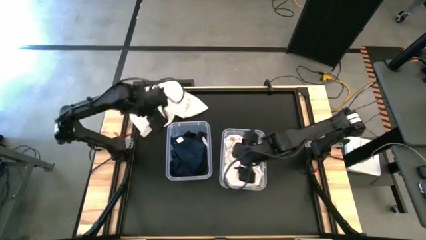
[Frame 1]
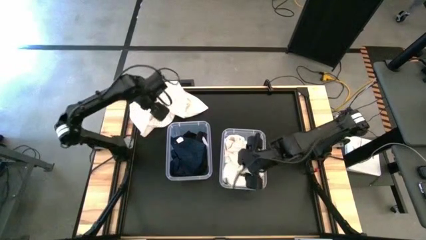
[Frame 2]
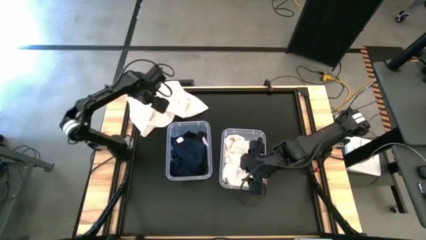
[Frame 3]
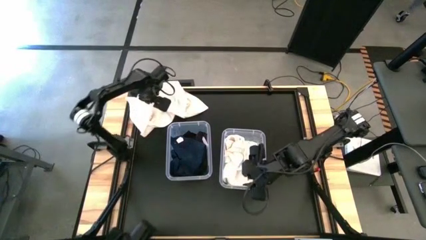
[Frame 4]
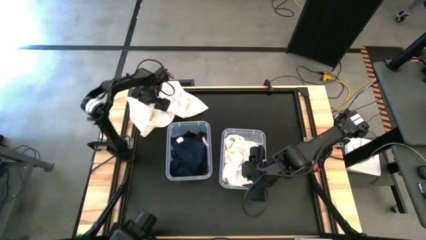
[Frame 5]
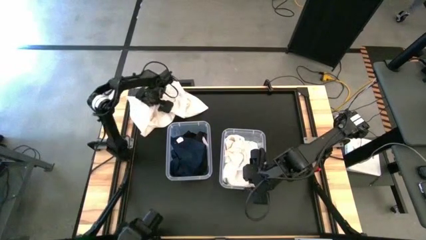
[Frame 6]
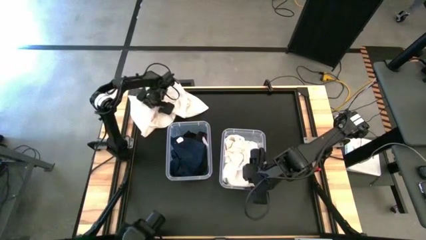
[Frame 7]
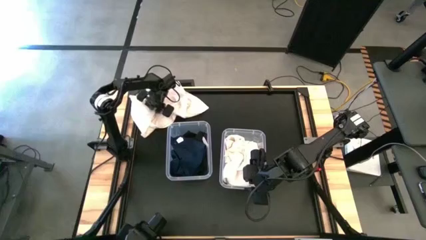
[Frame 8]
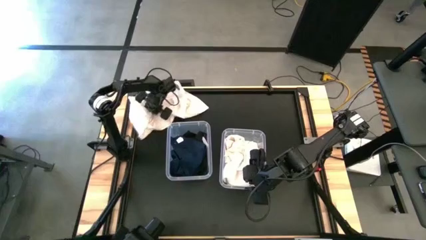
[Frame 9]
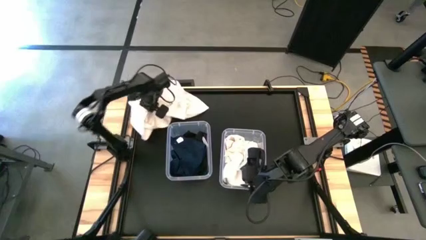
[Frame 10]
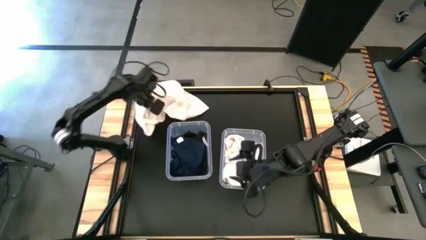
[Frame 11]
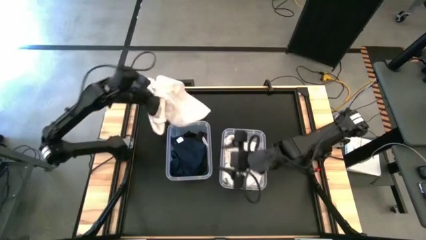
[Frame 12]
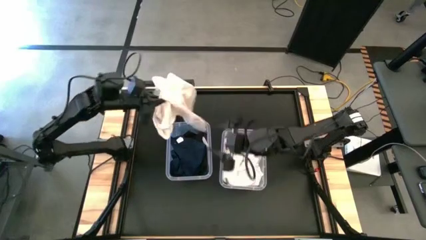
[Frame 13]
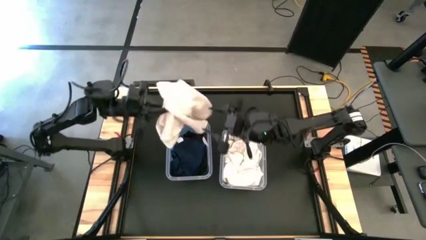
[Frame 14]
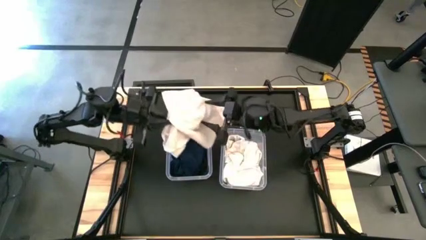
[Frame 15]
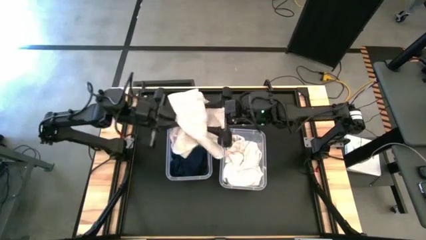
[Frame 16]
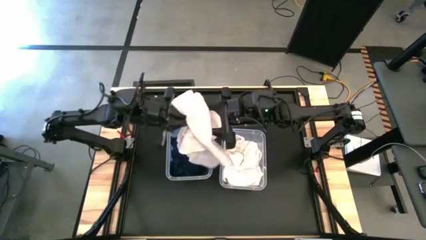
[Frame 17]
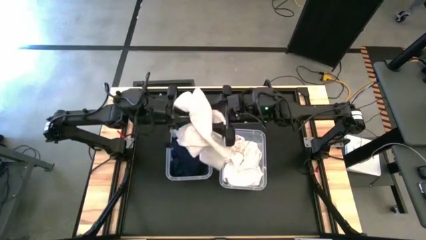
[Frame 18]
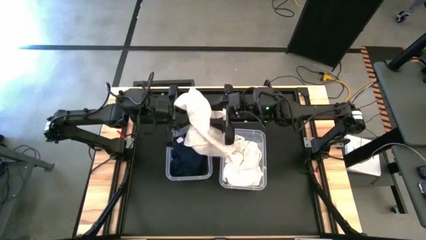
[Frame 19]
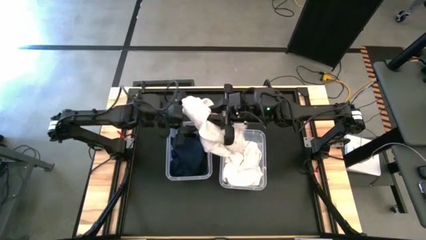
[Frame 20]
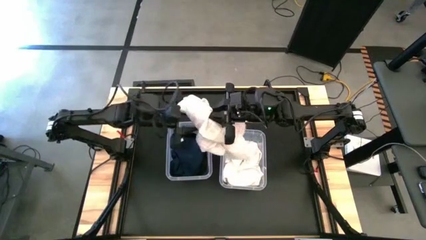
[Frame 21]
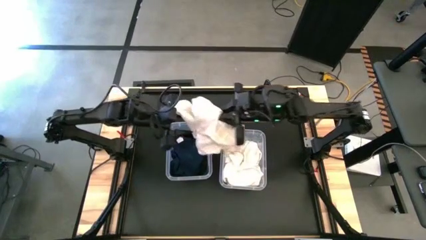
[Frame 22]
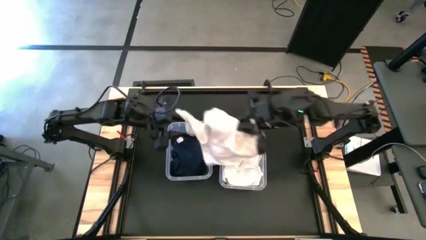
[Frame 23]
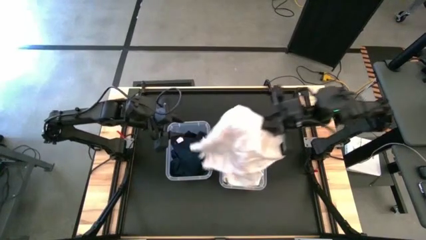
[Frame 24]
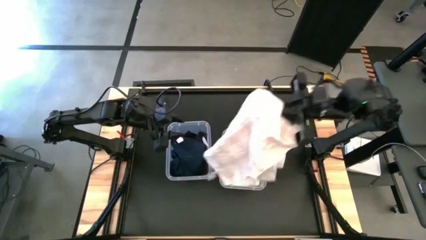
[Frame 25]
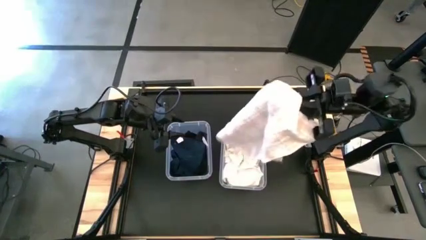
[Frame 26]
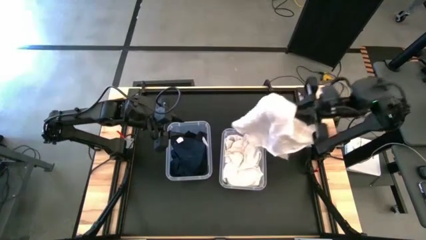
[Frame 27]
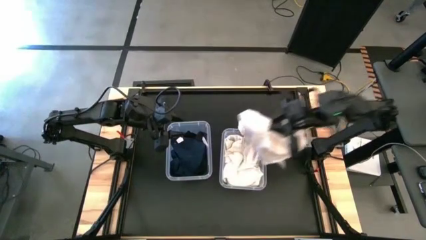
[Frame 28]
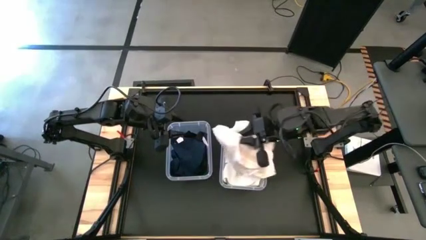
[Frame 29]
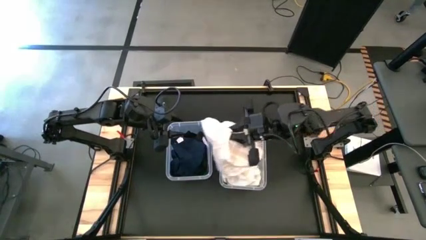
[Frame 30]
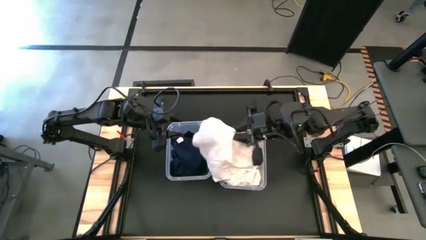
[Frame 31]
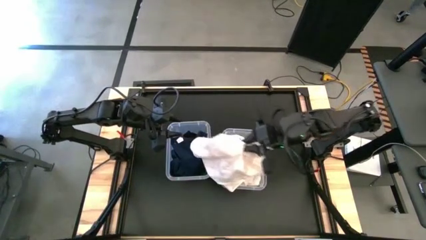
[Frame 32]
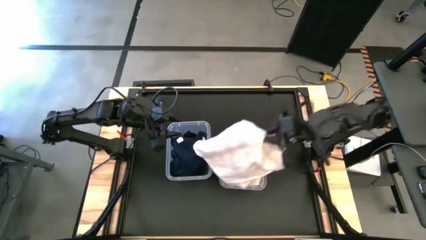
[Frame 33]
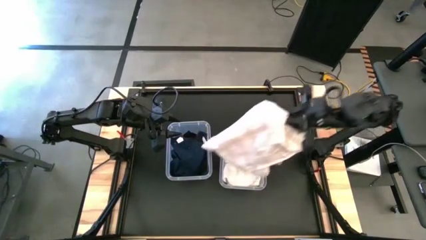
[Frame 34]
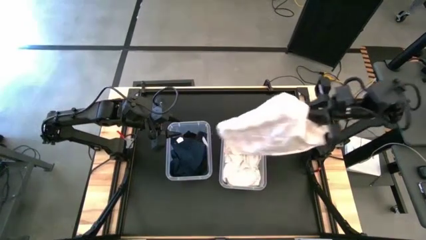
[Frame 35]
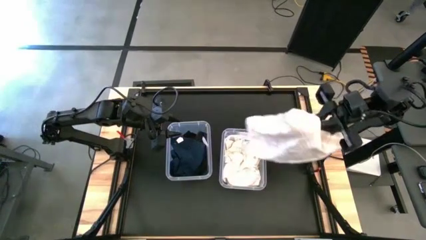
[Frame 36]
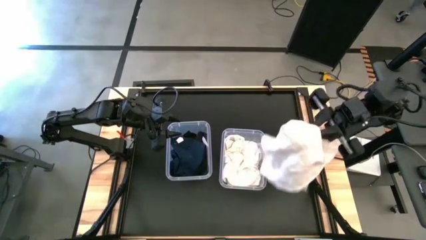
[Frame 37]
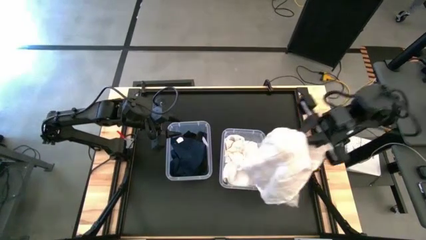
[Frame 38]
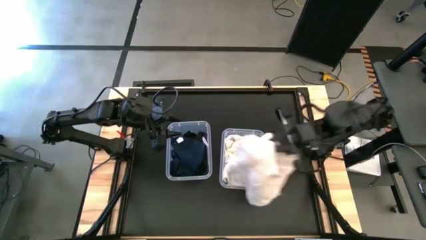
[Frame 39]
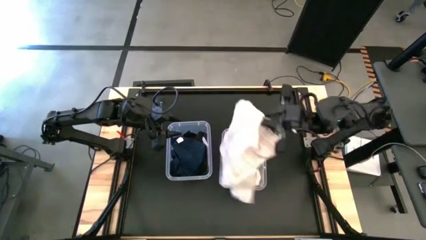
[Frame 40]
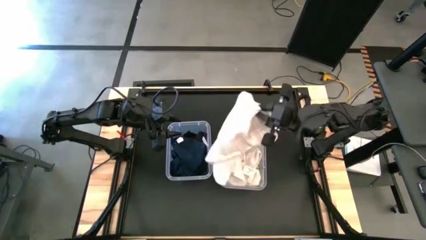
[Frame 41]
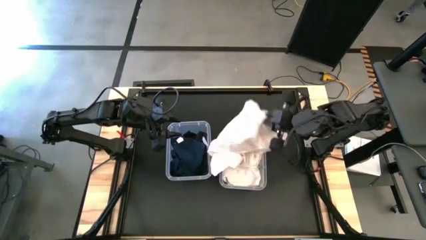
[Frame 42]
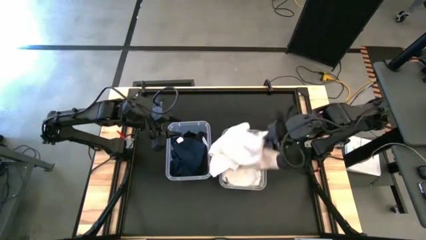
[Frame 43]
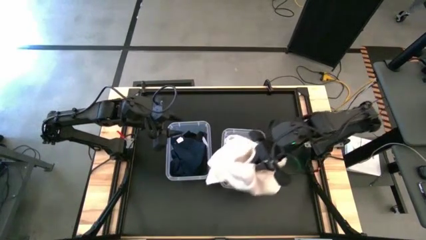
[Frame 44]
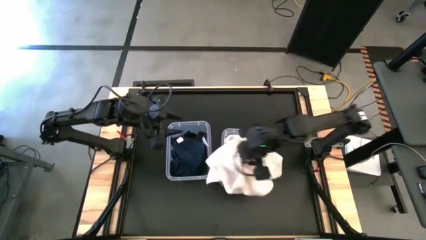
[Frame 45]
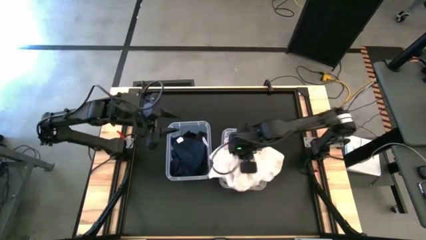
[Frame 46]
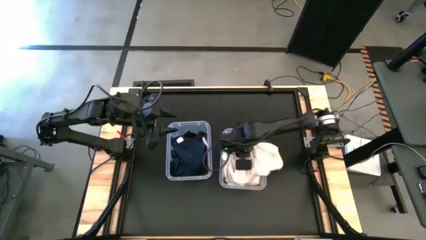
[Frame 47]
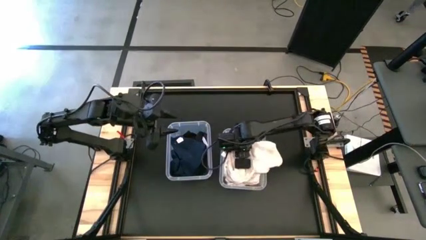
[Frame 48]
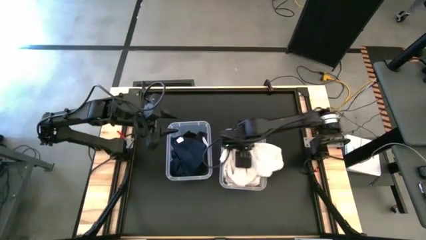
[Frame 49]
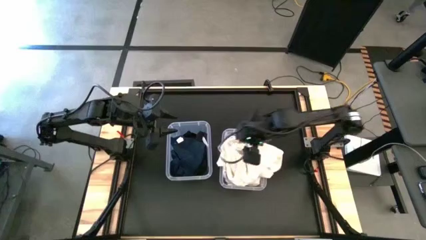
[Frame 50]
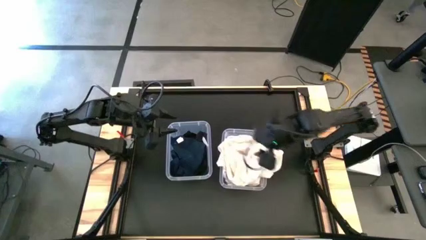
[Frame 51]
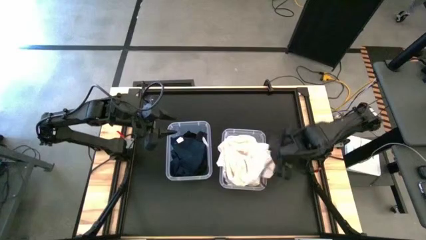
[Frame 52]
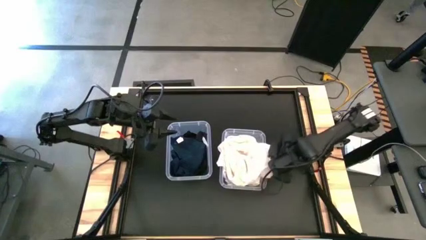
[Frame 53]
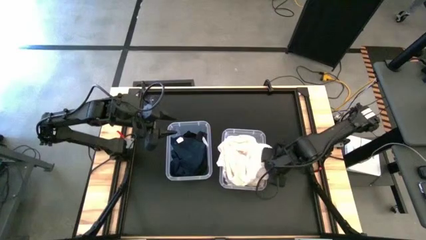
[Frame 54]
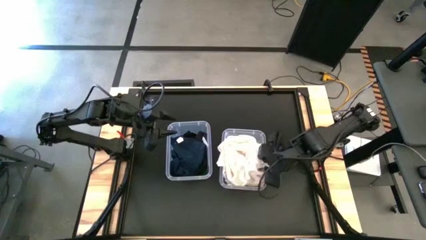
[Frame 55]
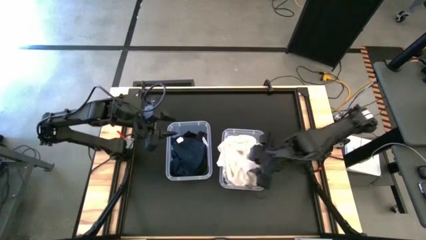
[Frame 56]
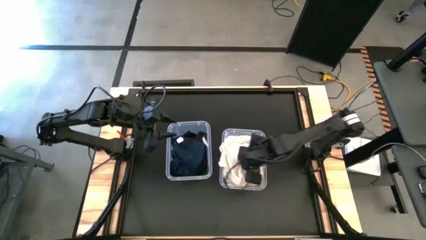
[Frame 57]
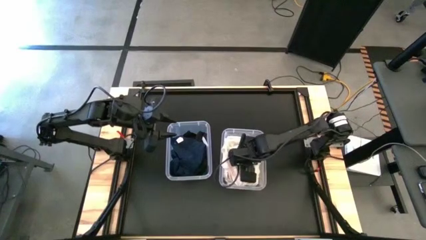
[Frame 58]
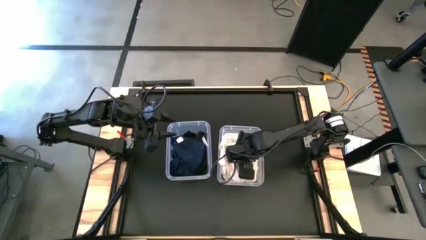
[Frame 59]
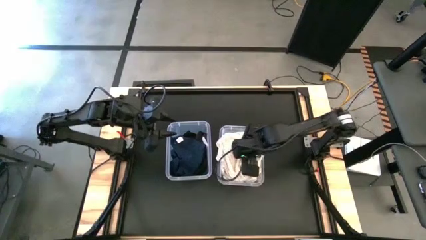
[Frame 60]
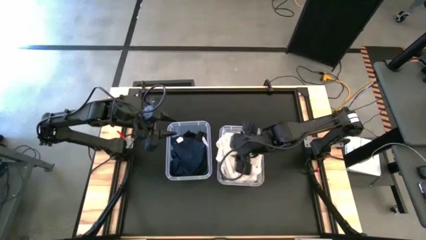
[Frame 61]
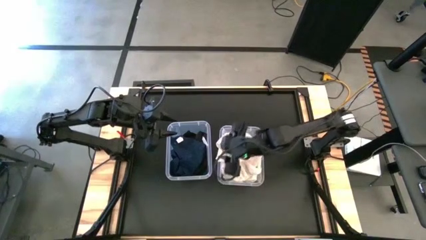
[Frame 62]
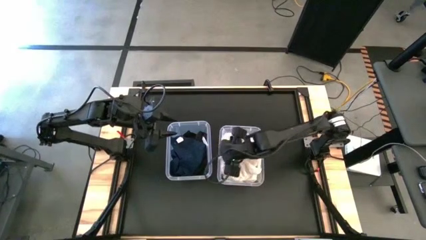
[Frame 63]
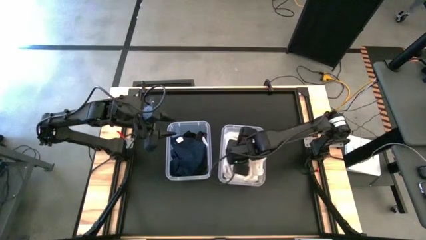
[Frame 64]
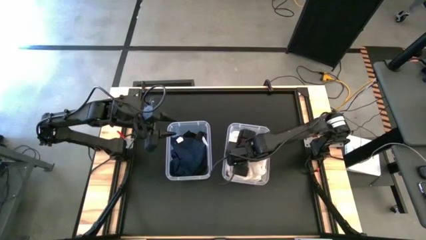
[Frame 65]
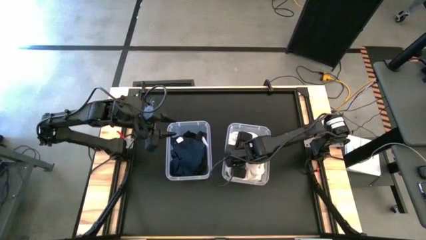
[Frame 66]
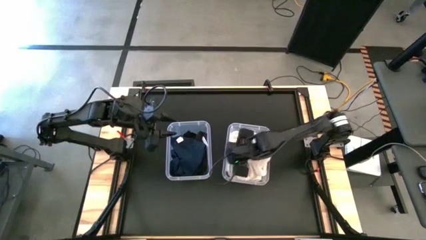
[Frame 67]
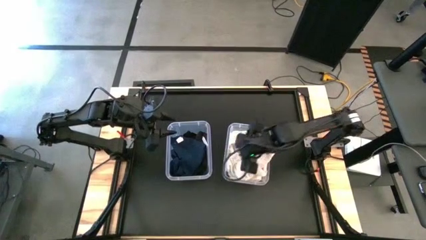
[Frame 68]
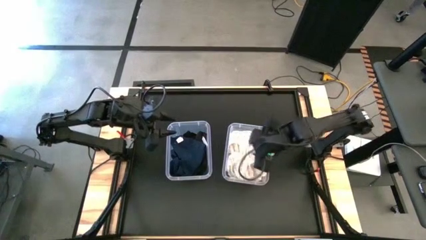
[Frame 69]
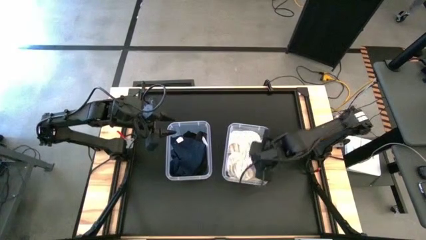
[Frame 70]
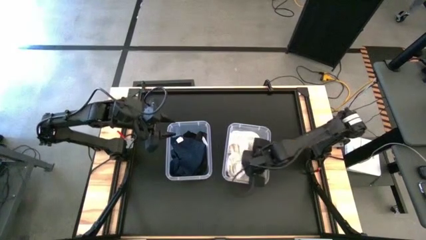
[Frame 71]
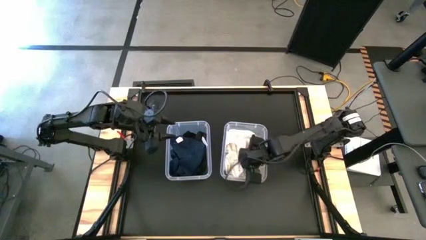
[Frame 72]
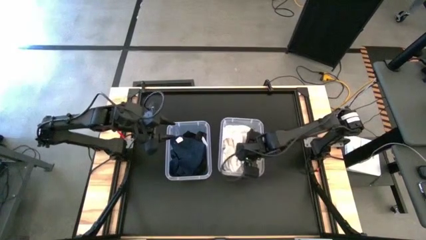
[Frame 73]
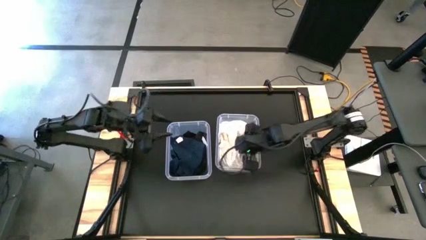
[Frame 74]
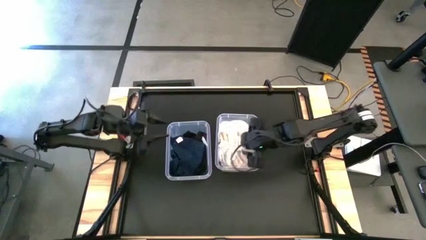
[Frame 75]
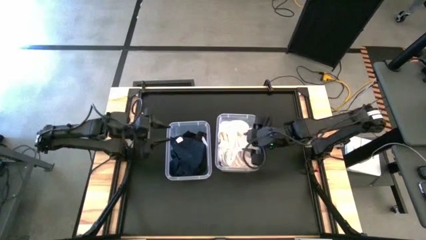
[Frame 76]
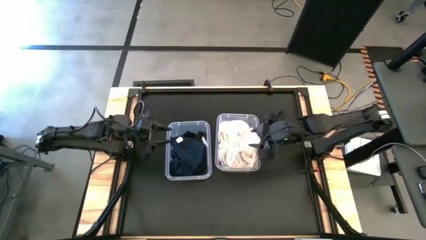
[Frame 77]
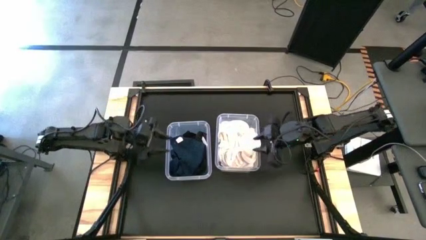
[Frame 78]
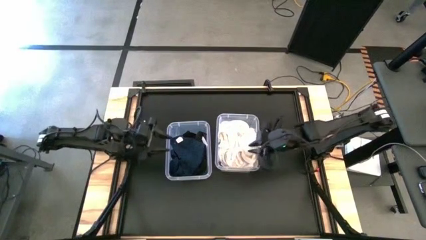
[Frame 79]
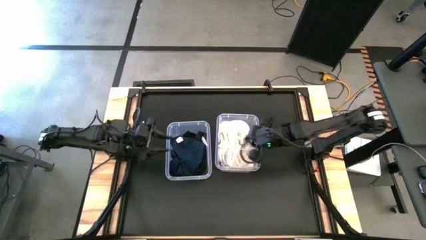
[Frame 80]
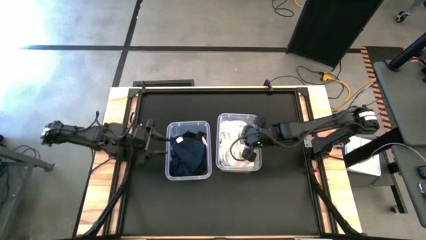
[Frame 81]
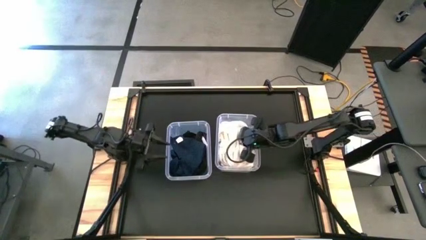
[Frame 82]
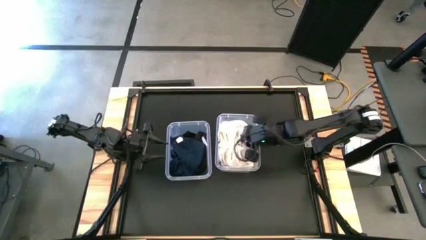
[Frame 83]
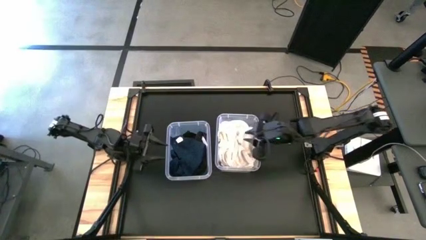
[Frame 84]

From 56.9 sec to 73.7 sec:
Task: Sort towels by color in basket
Put the white towel into the right transparent bin
